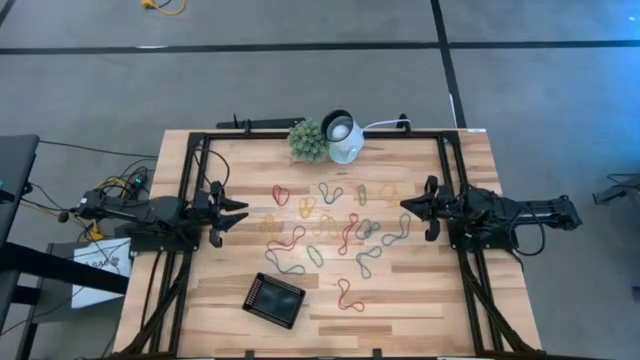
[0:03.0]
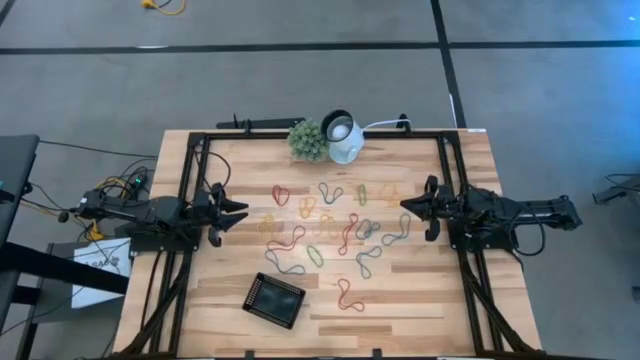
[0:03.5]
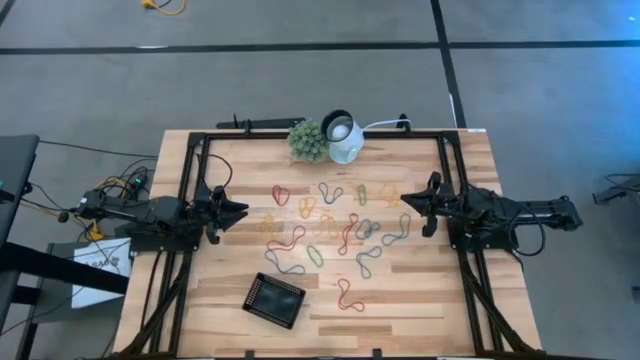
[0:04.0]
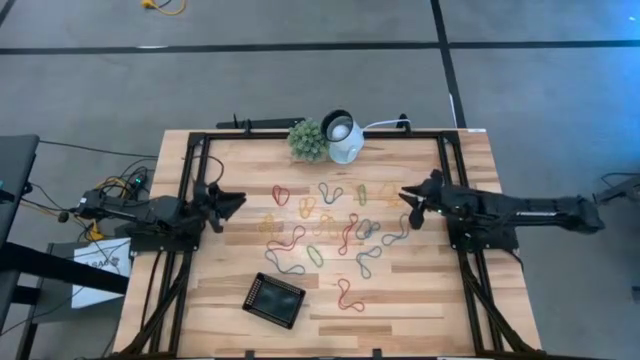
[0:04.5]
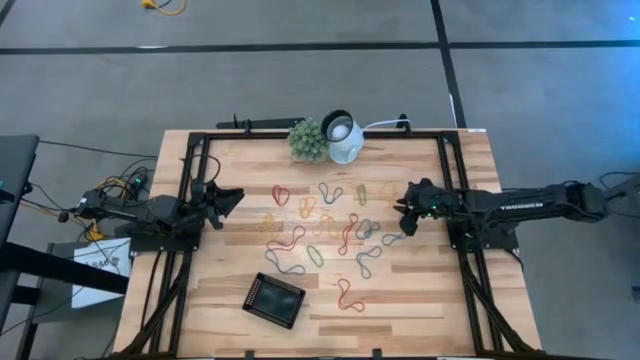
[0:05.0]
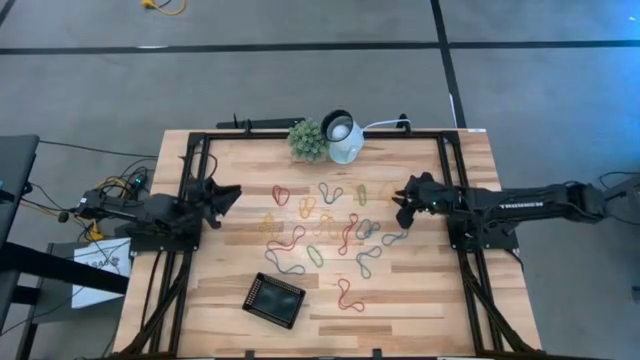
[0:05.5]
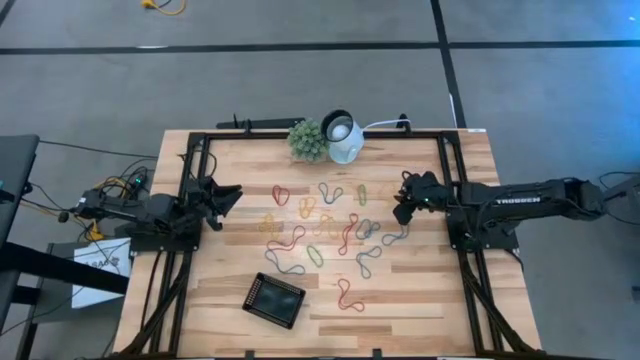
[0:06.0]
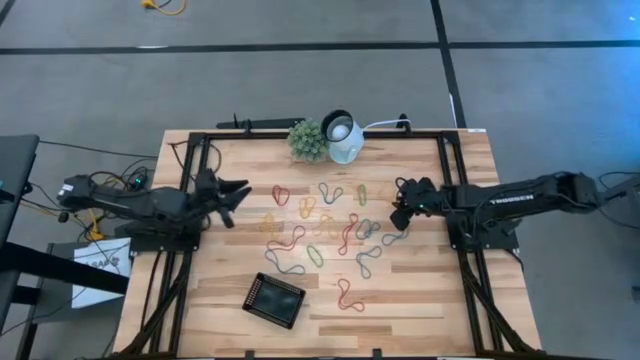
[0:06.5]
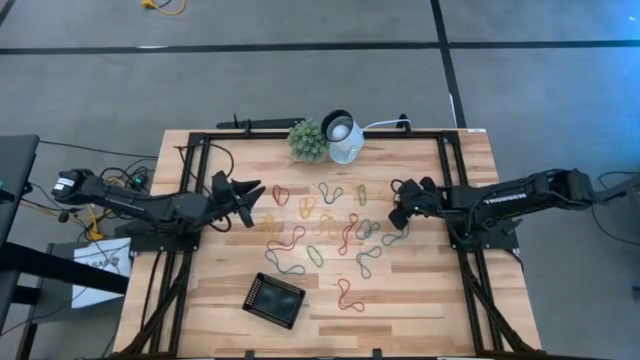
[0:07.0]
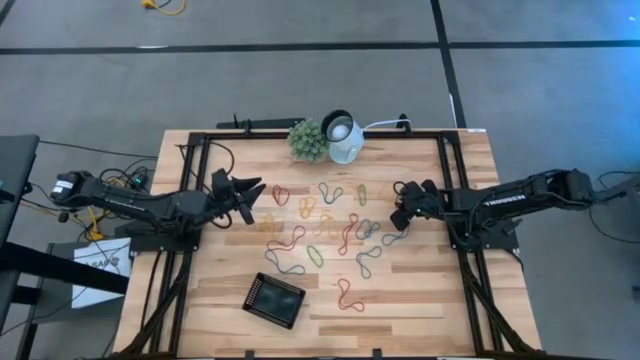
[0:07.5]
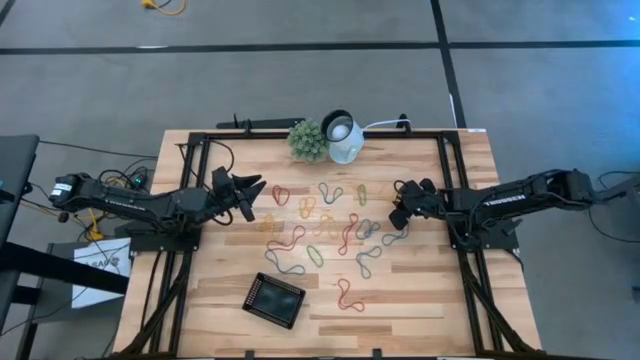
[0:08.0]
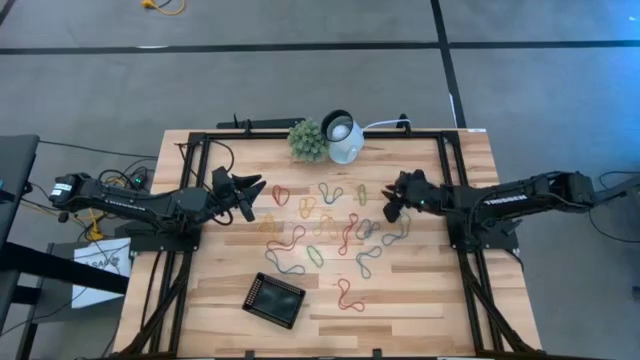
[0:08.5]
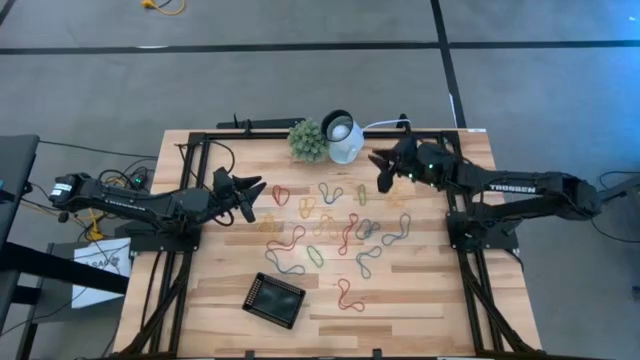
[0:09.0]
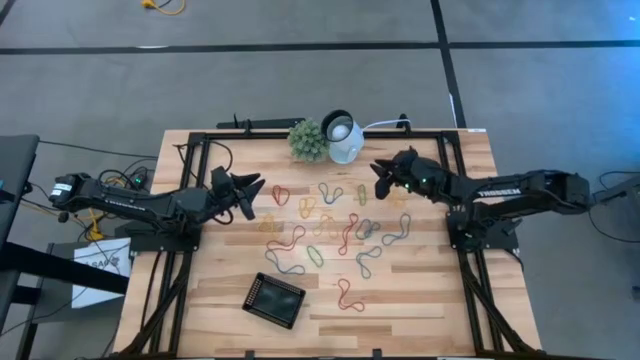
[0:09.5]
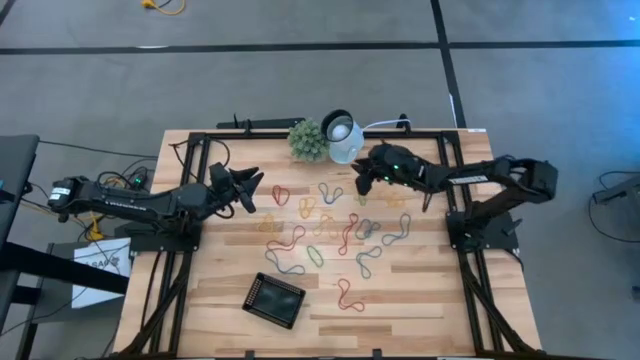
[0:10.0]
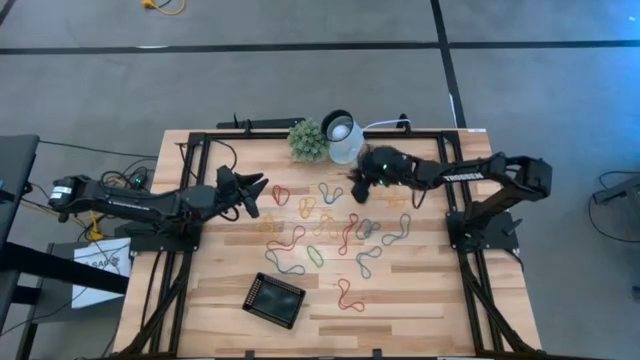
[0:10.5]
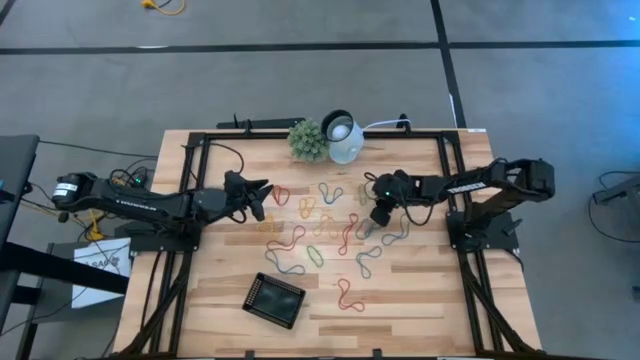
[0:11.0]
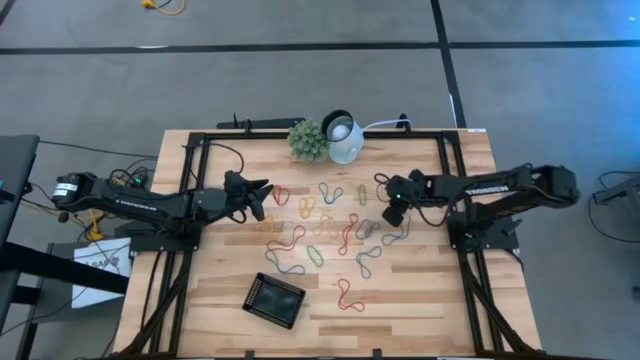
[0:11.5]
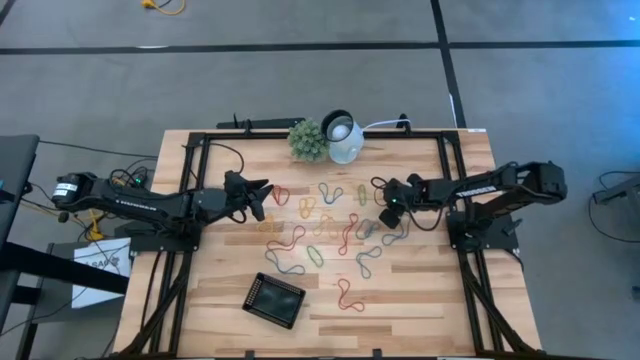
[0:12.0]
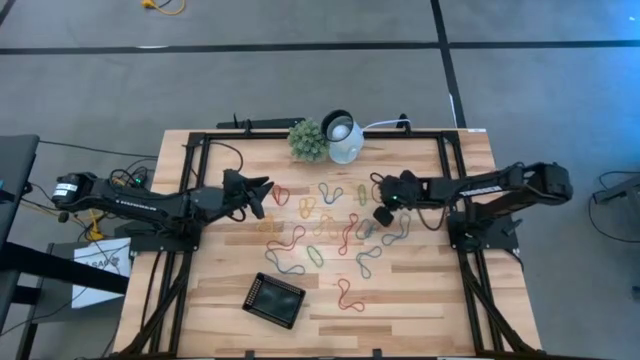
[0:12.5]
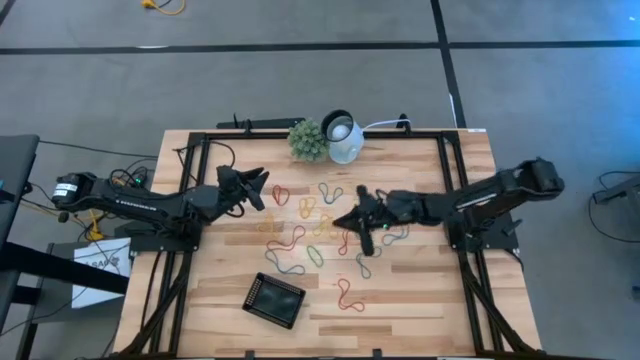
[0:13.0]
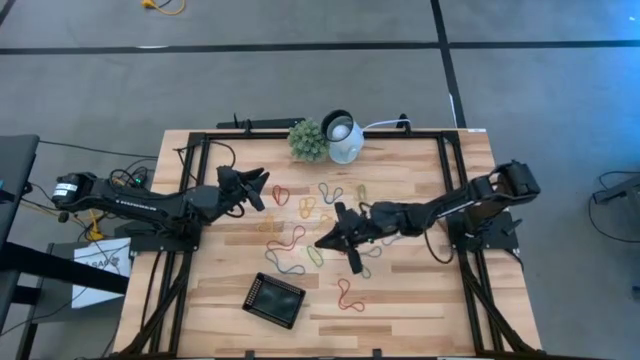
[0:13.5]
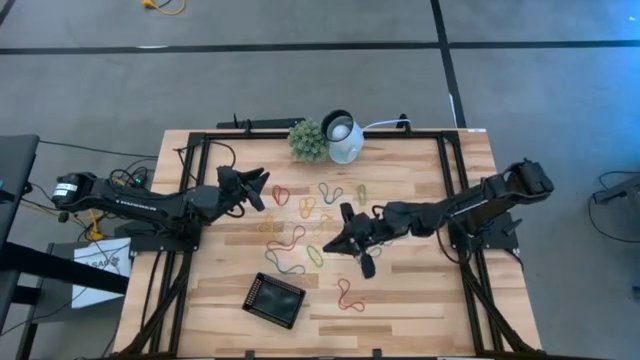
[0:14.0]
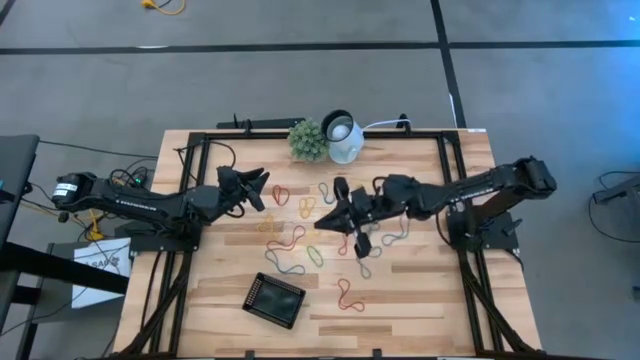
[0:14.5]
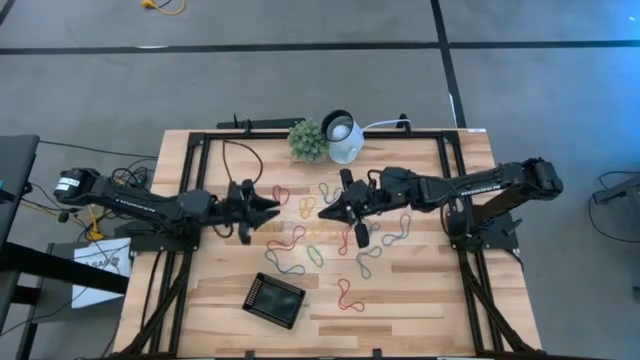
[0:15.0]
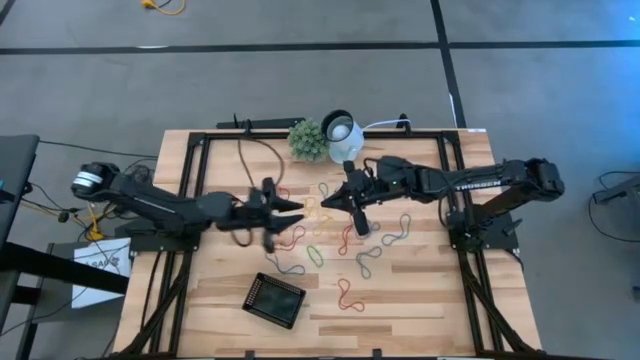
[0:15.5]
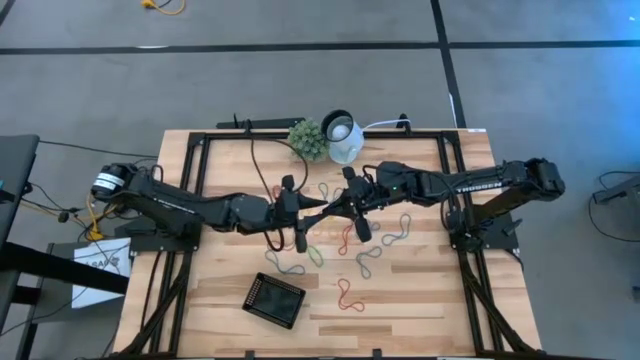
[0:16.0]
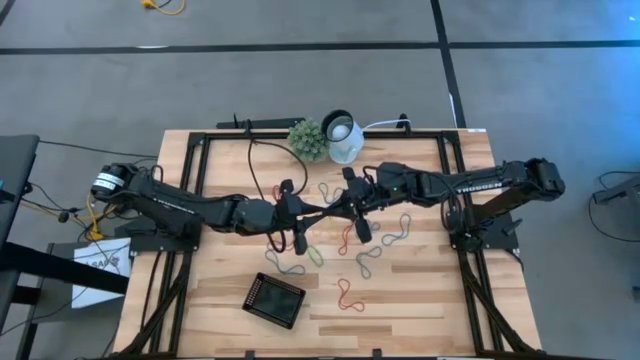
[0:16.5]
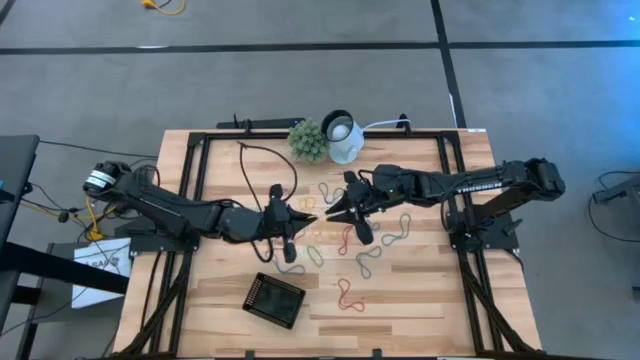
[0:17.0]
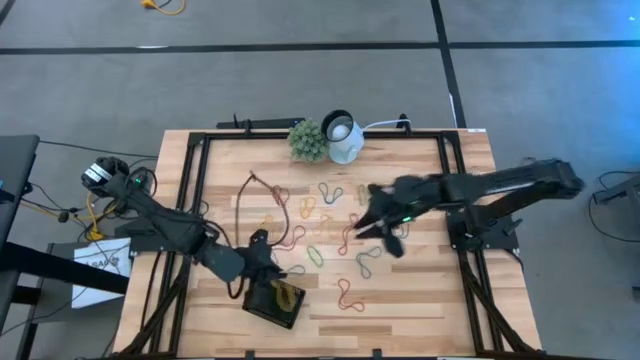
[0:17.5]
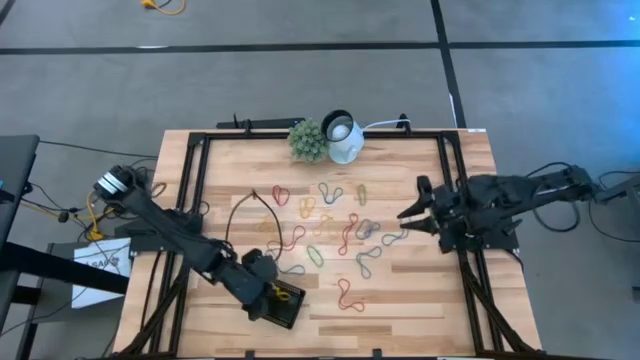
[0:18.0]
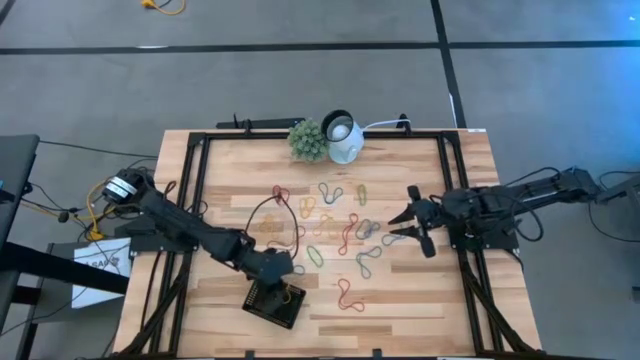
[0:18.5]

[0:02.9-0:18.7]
Task: Pick and place items into bin
Put the yellow rubber band into the black bin

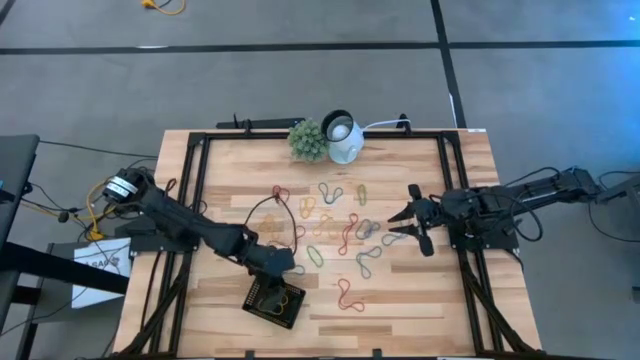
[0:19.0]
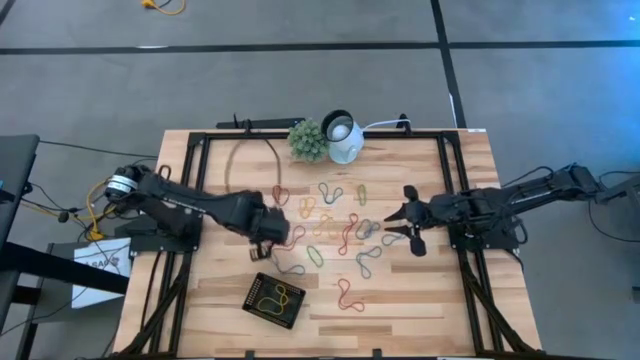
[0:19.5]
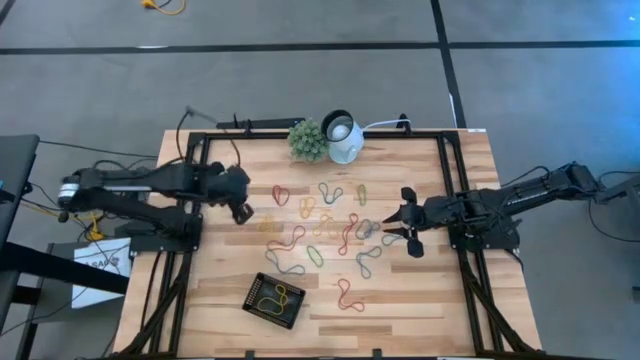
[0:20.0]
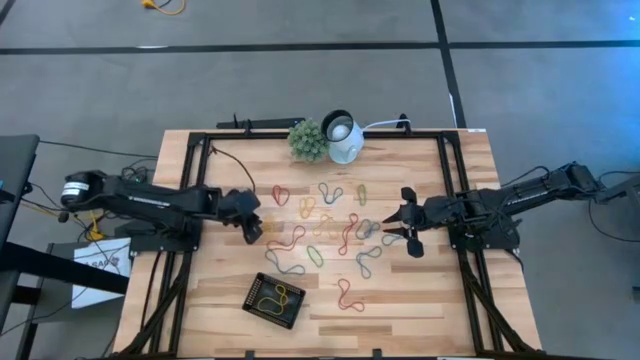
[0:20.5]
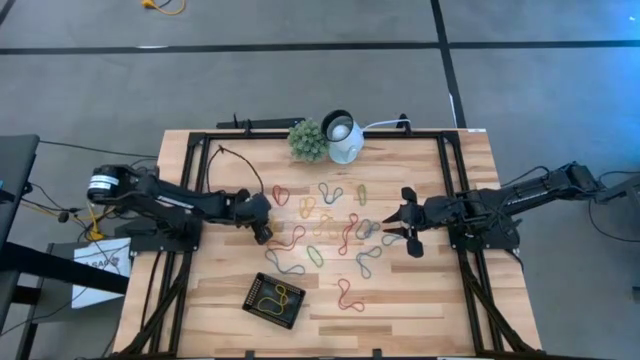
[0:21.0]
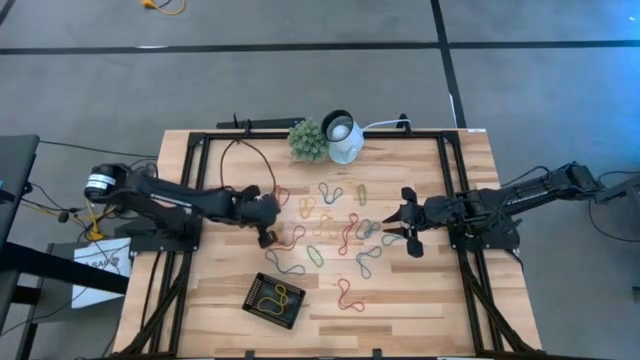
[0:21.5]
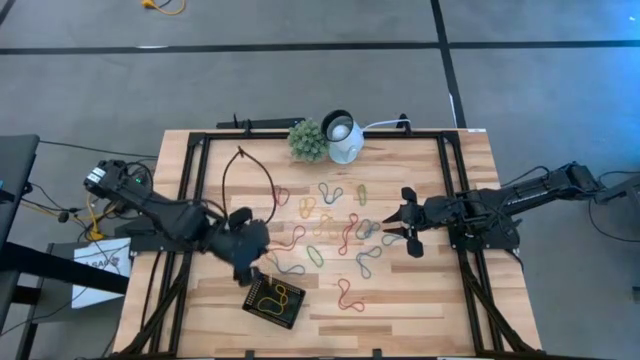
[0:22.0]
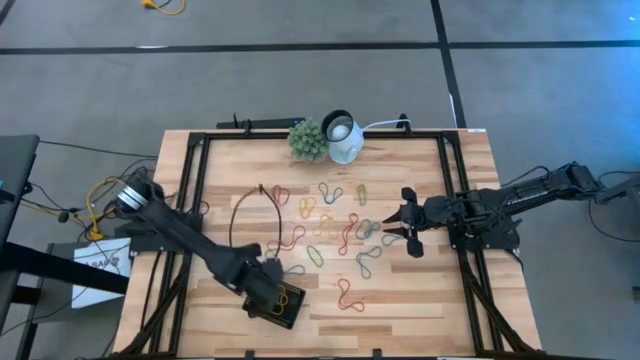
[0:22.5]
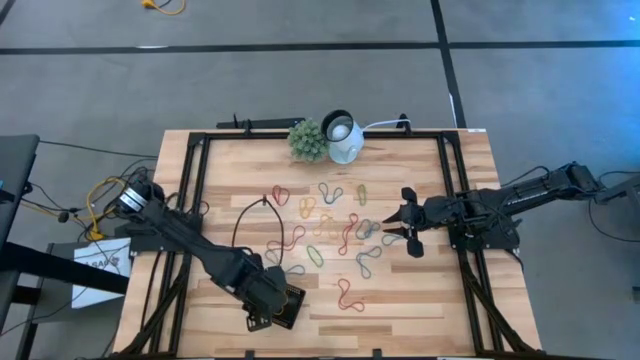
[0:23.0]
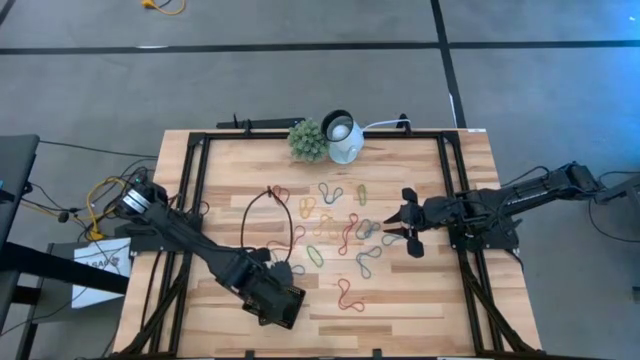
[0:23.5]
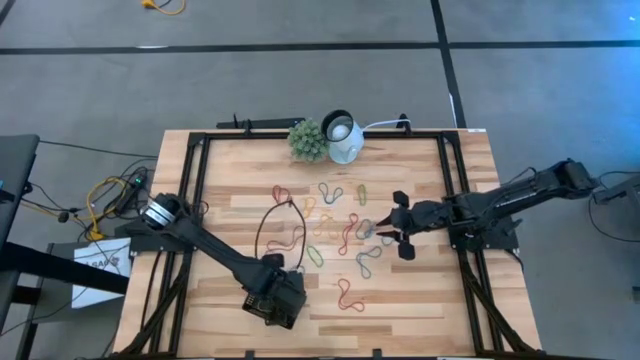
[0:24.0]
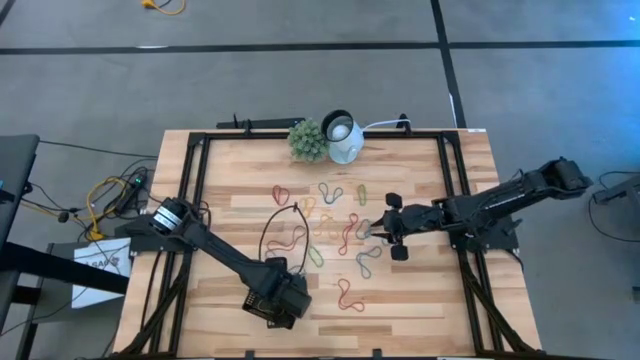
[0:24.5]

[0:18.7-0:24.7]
Put the yellow rubber band into the black bin
